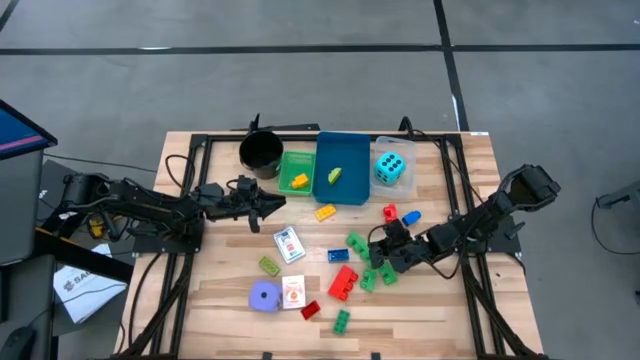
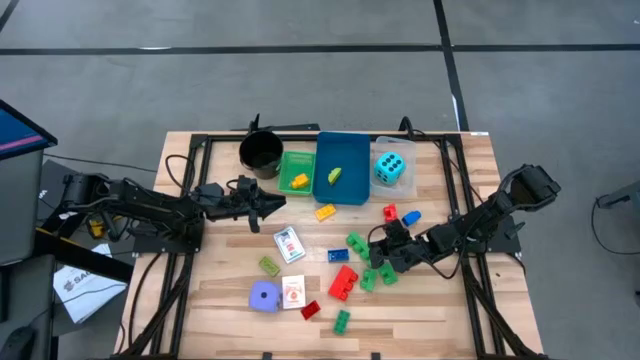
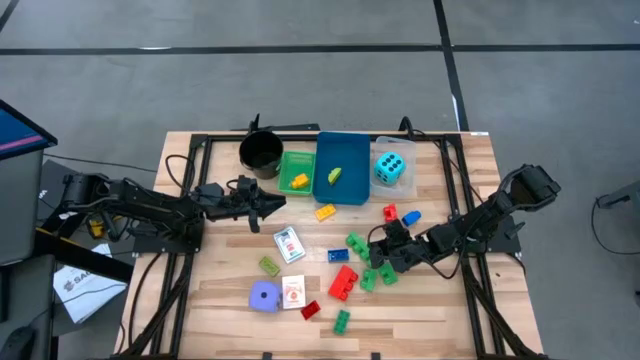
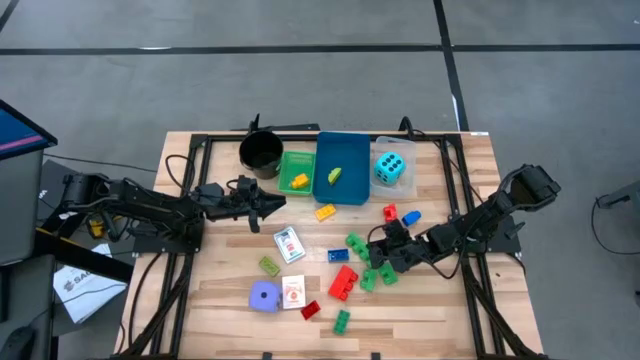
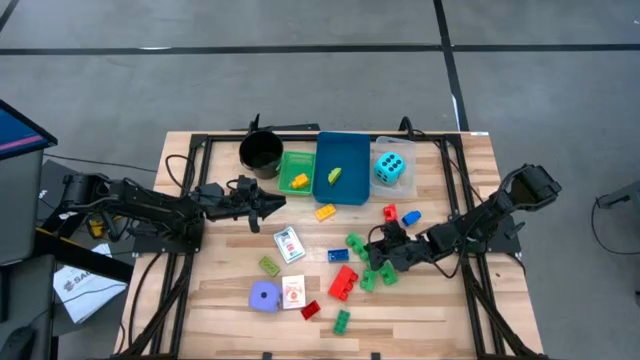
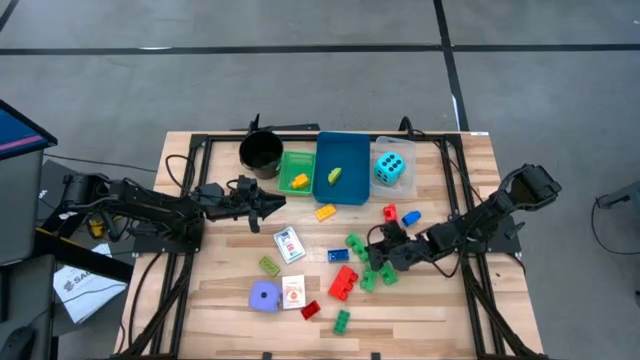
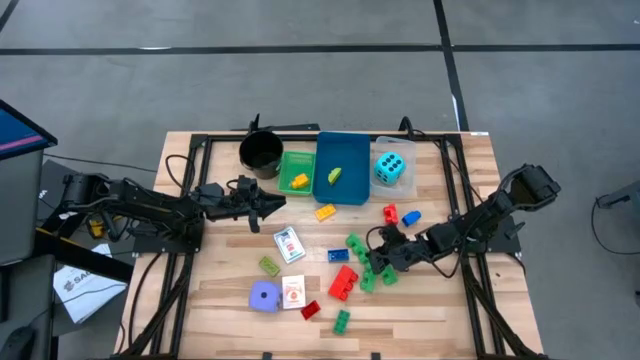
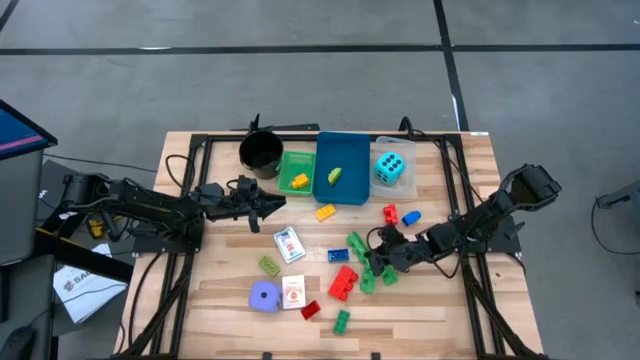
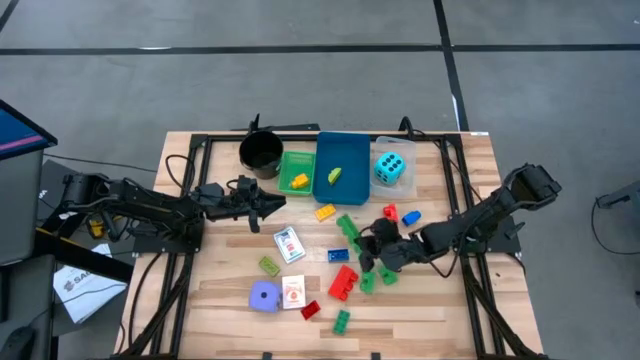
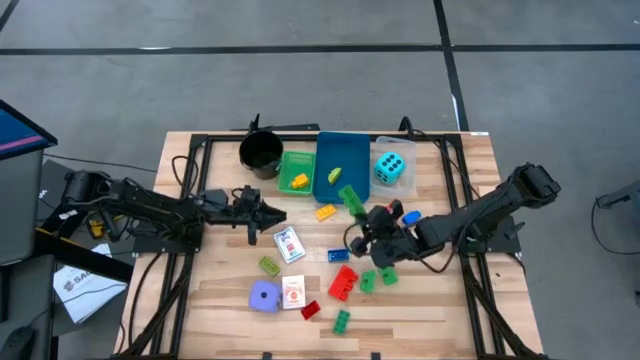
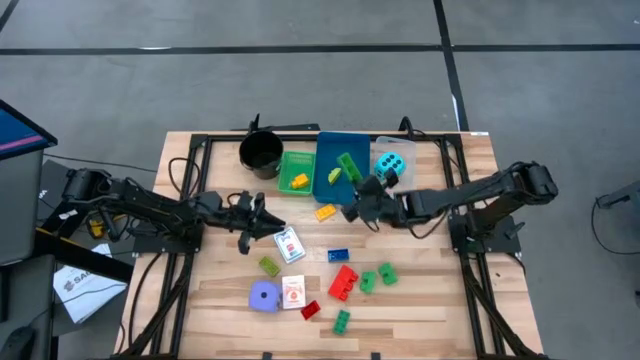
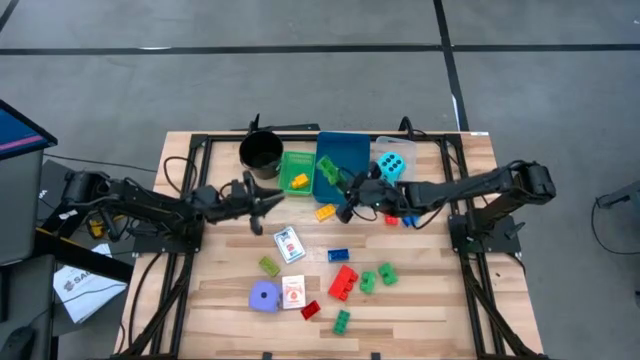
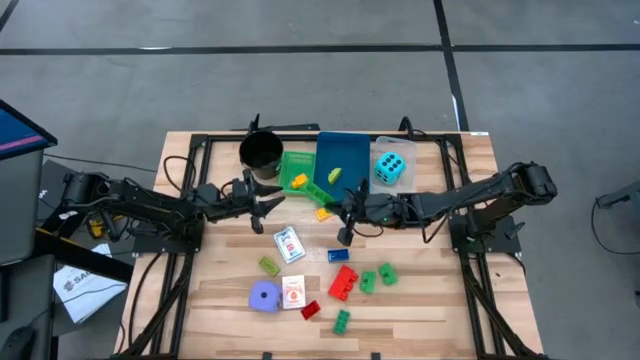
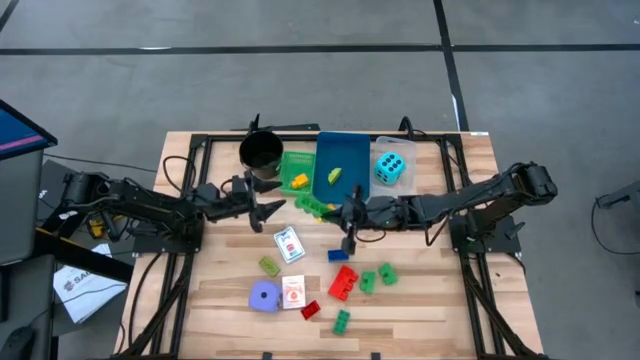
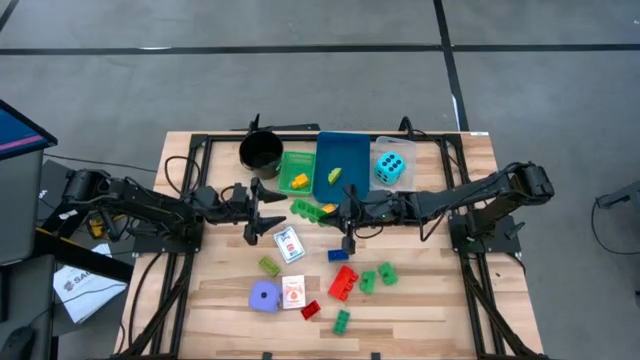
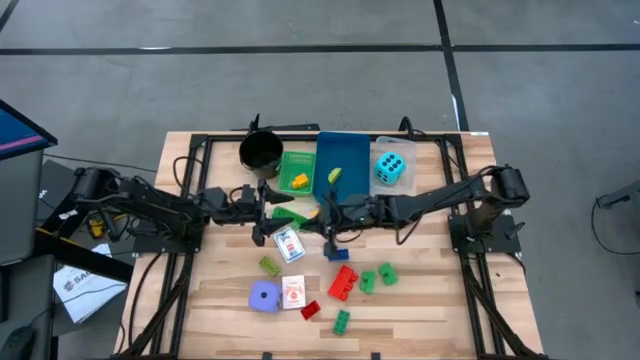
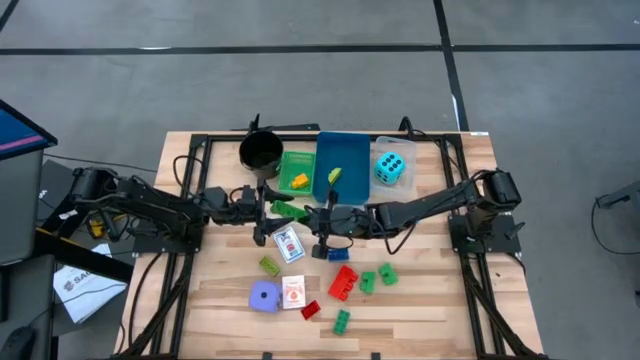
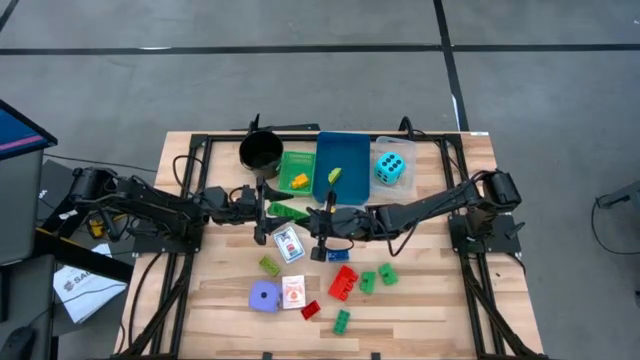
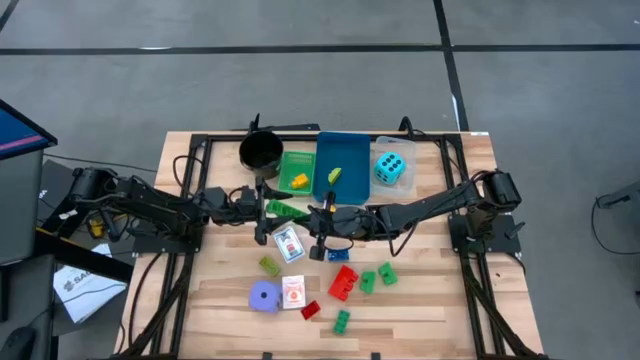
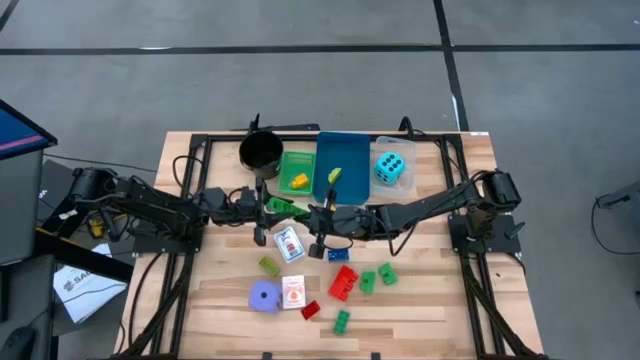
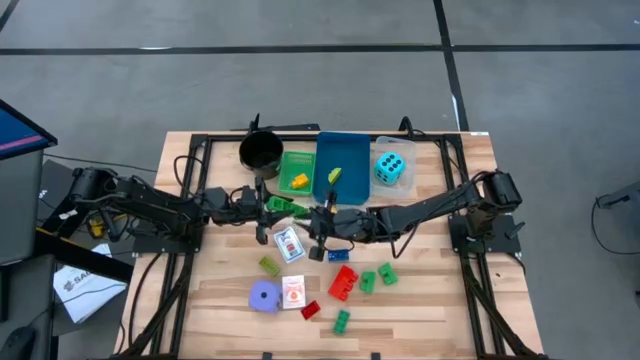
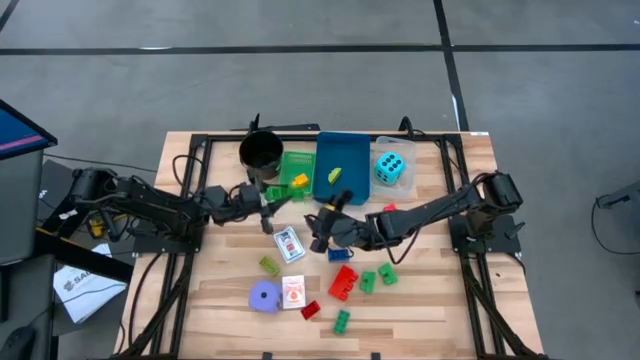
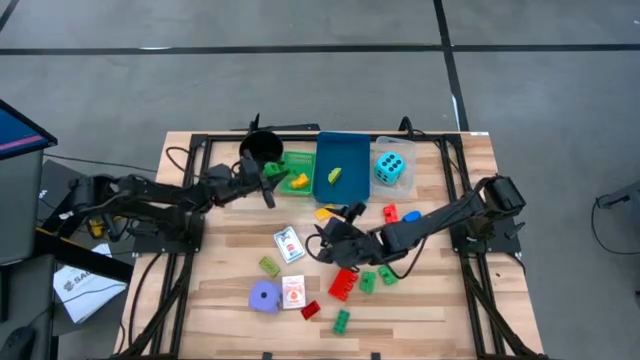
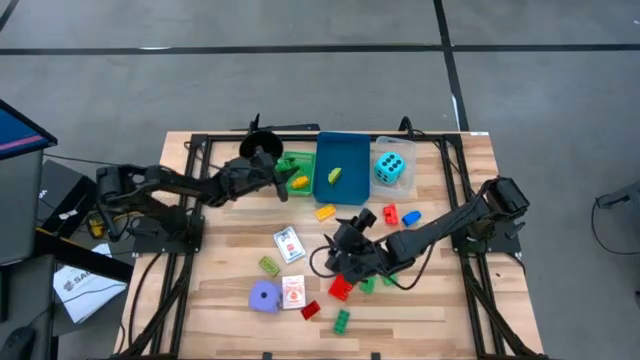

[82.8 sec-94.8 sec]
Task: Pick & Place Toys
Put the large stud green game piece into the green bin

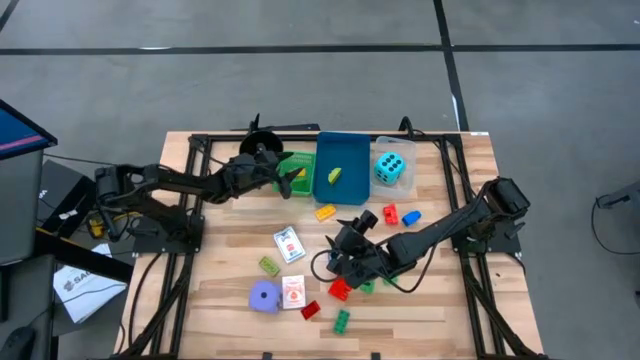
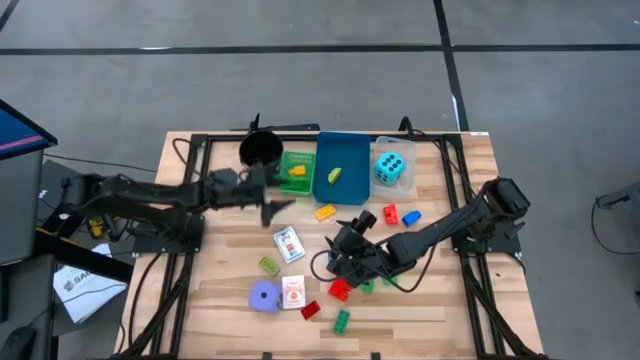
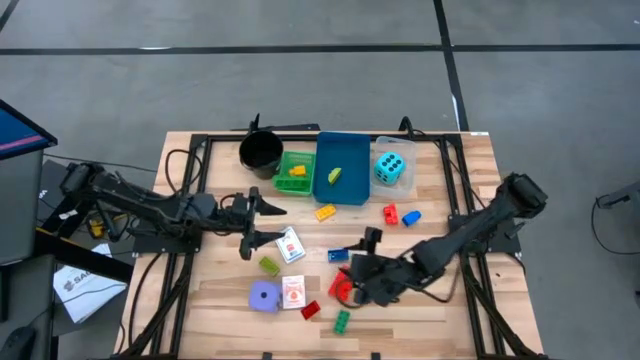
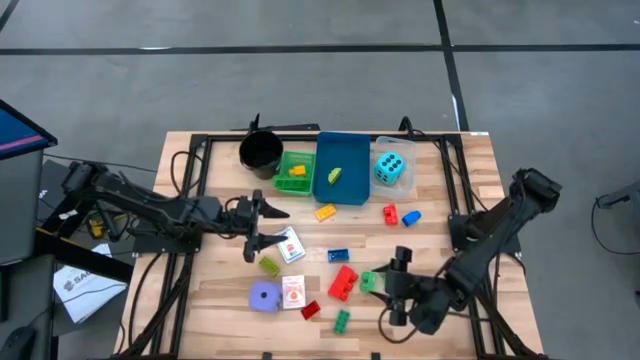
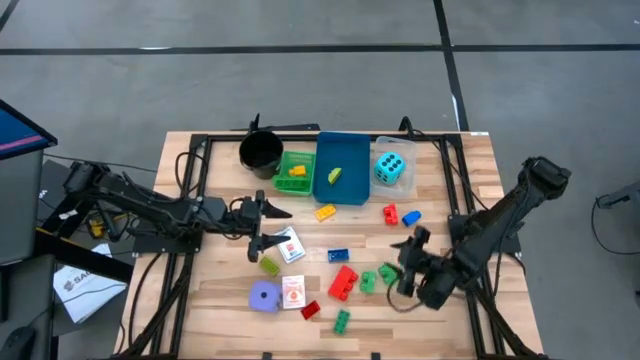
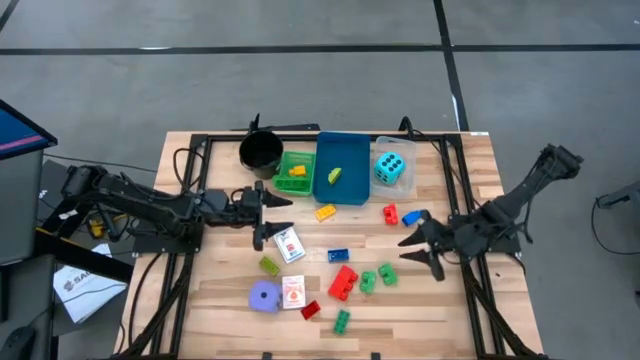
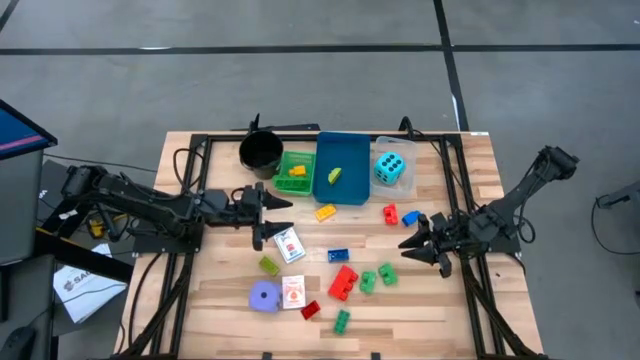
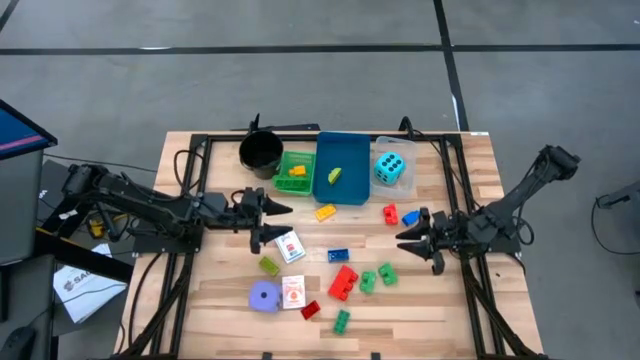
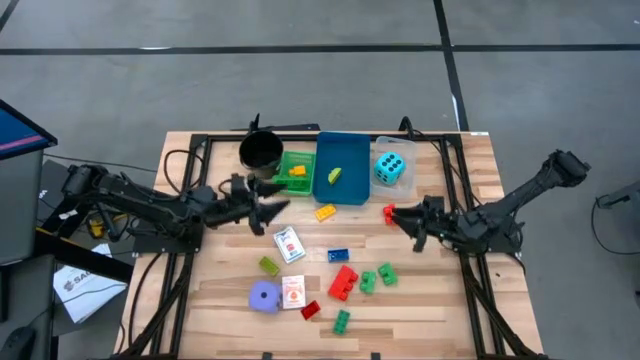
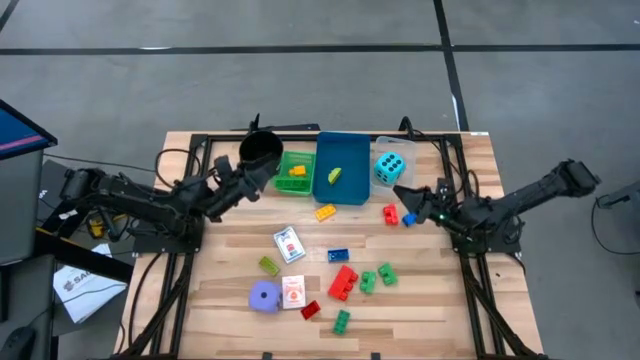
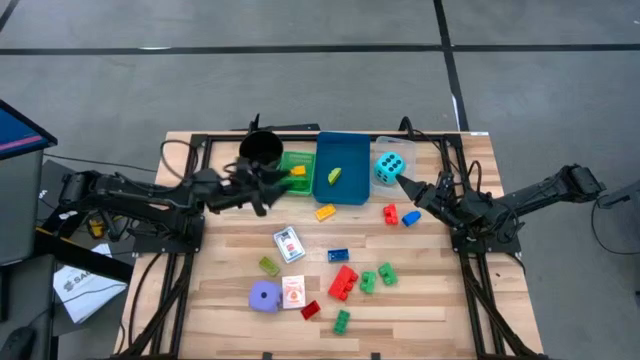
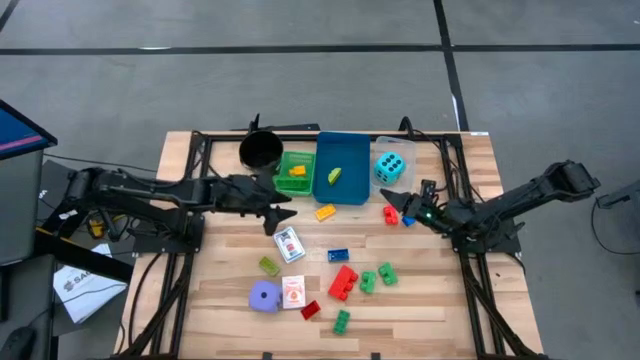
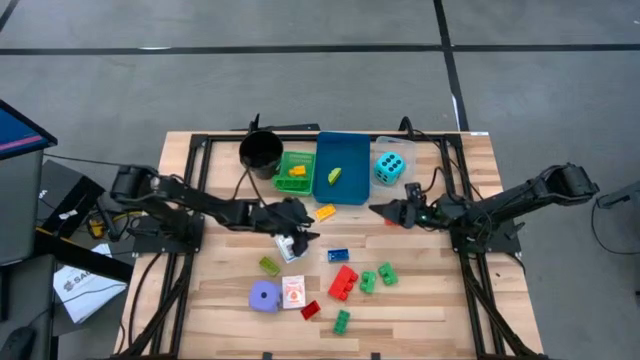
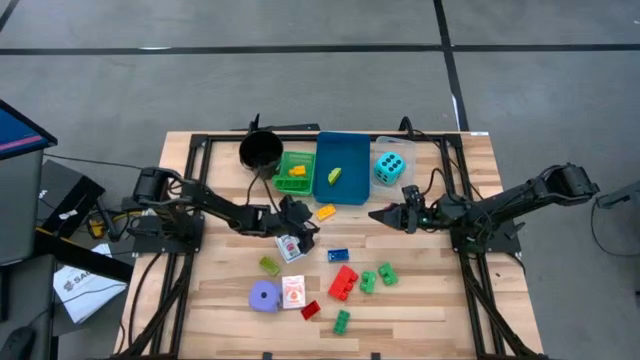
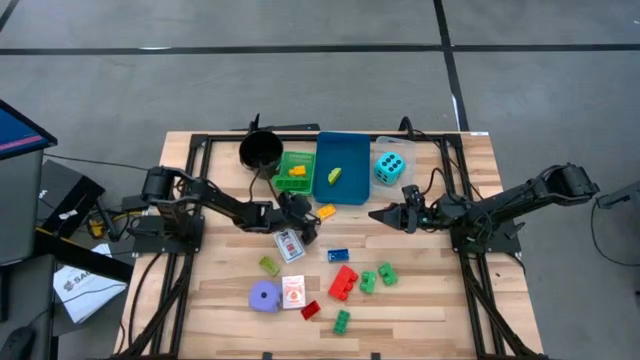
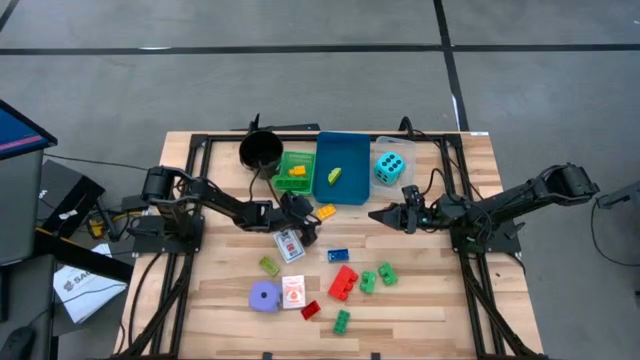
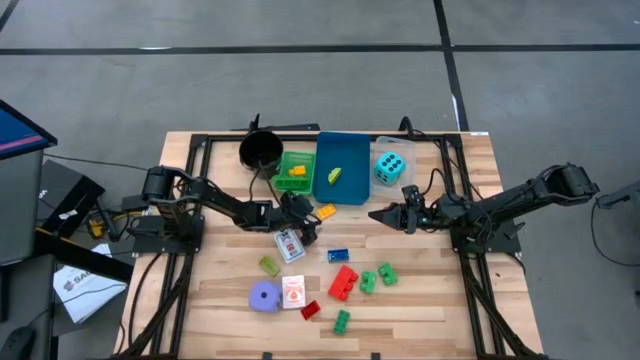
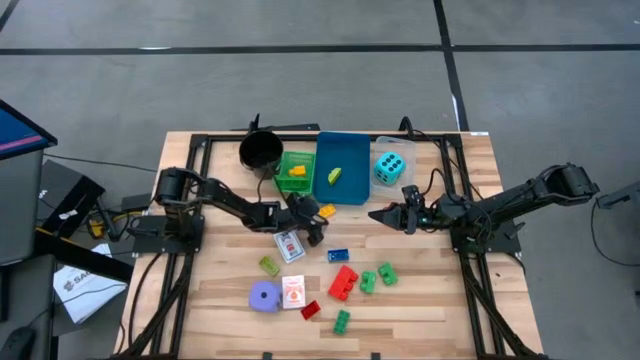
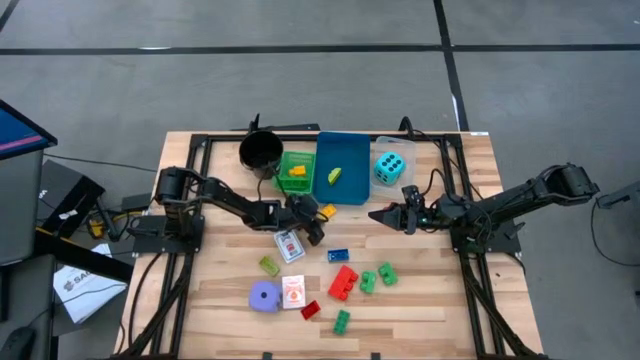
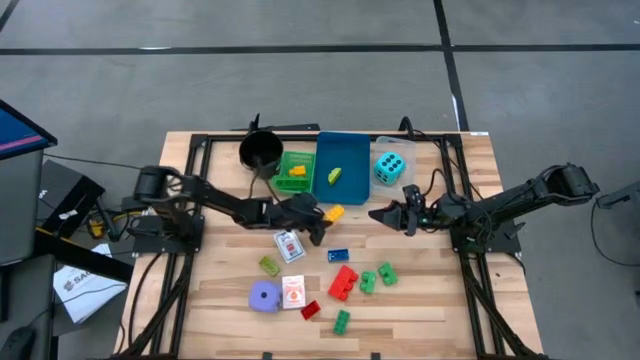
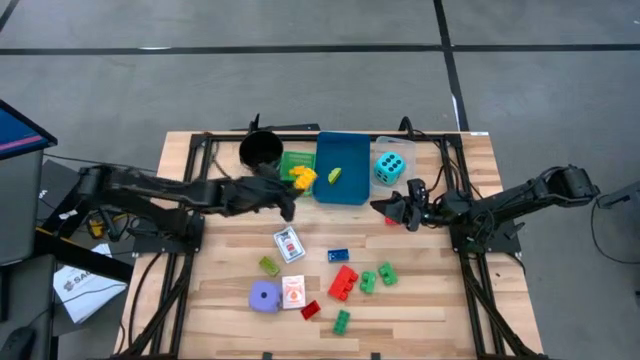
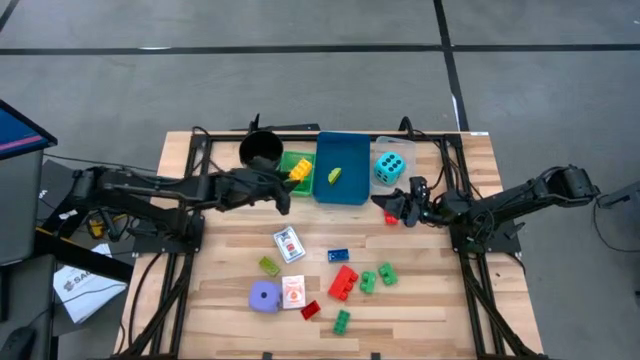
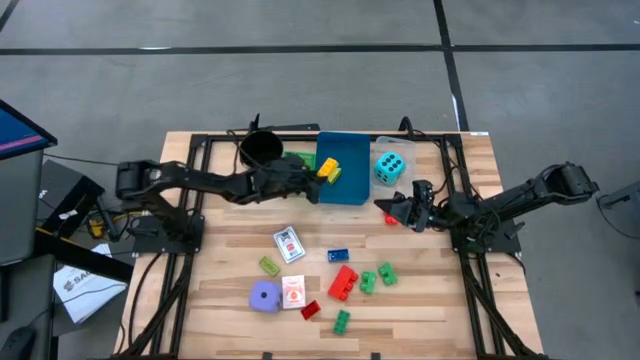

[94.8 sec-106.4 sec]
Put the small stud yellow game piece into the blue bin
